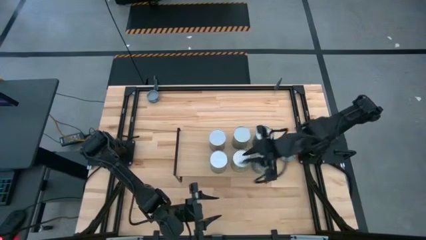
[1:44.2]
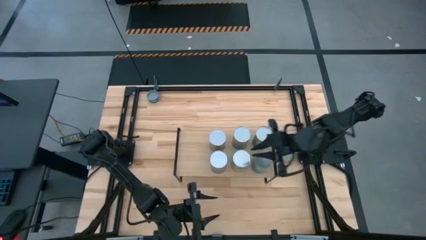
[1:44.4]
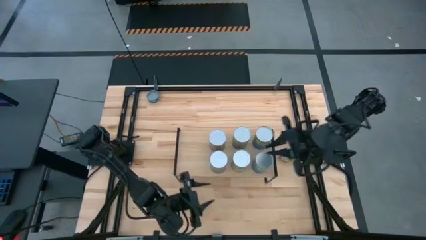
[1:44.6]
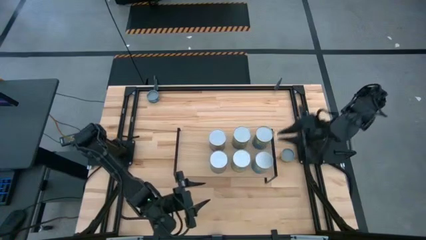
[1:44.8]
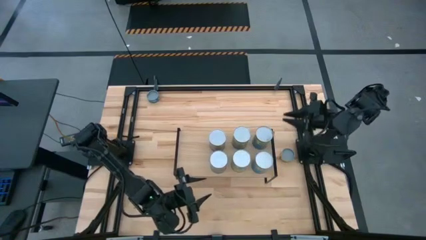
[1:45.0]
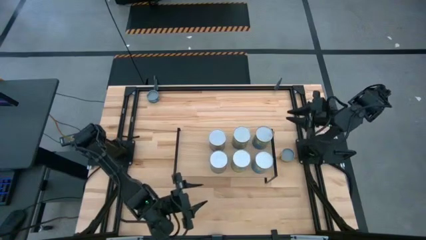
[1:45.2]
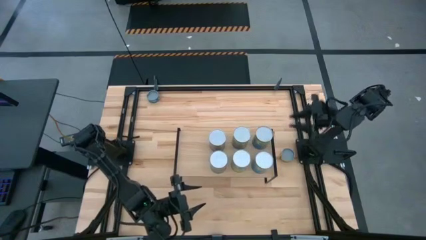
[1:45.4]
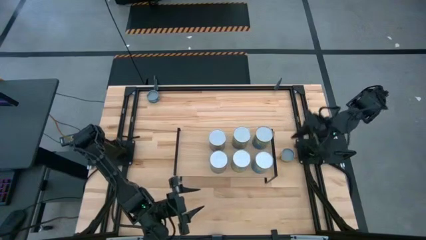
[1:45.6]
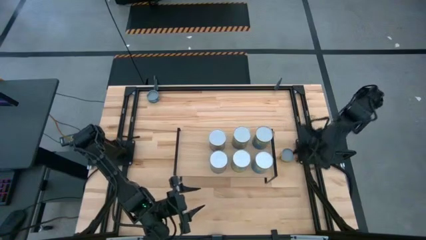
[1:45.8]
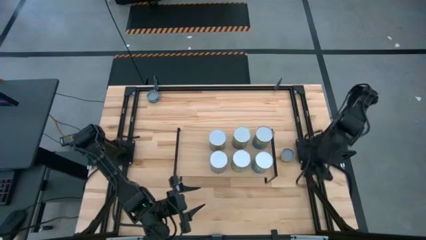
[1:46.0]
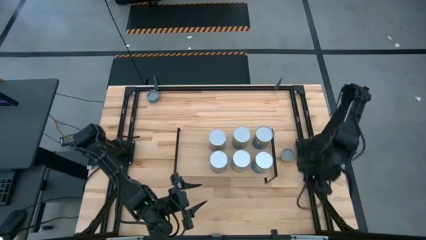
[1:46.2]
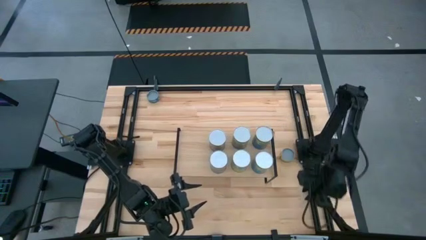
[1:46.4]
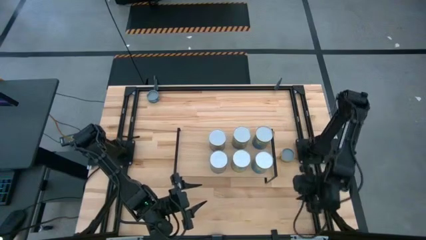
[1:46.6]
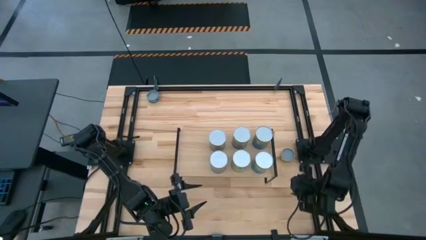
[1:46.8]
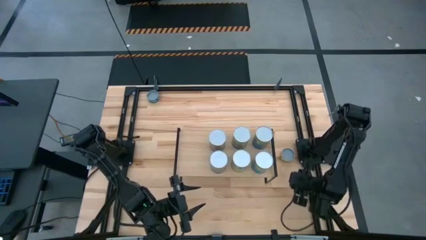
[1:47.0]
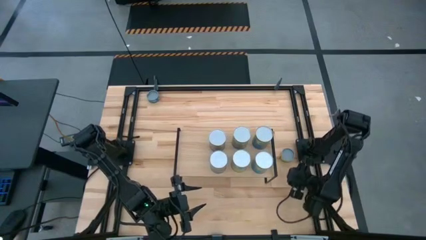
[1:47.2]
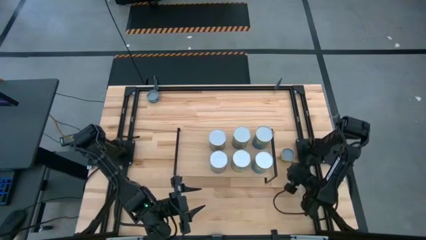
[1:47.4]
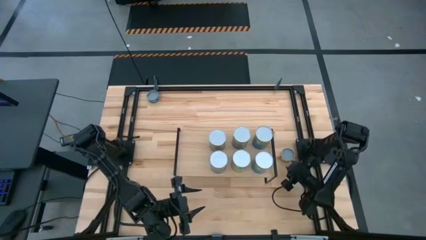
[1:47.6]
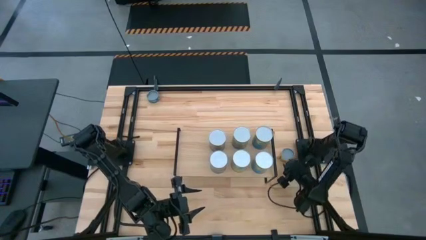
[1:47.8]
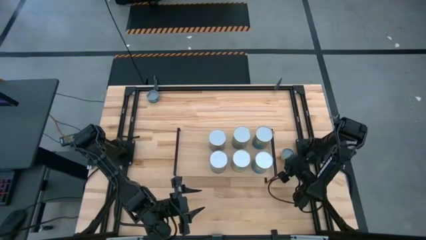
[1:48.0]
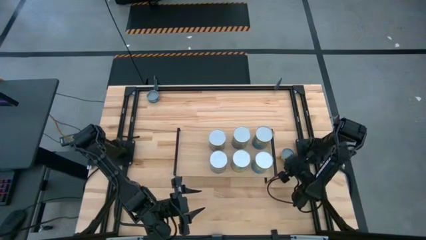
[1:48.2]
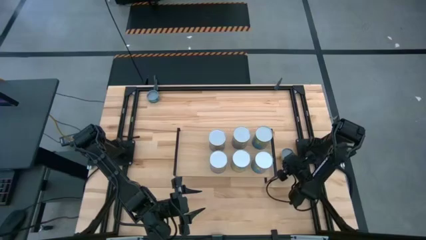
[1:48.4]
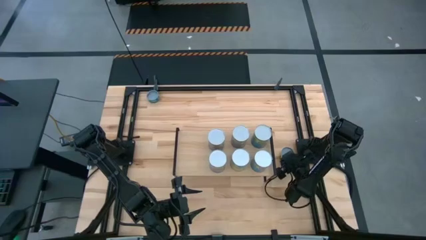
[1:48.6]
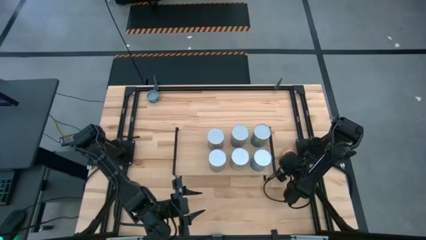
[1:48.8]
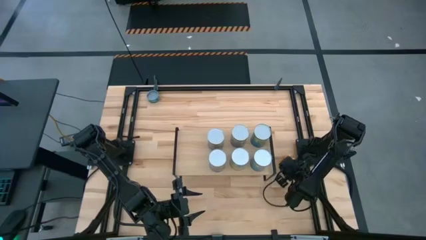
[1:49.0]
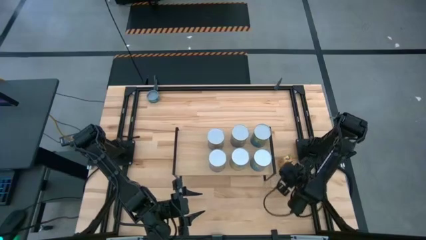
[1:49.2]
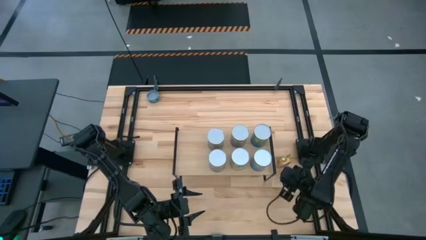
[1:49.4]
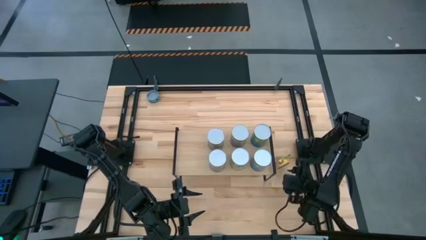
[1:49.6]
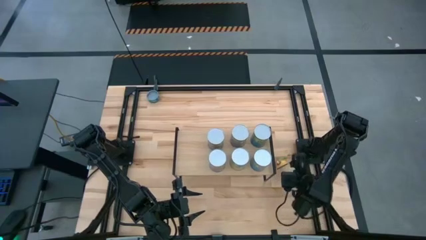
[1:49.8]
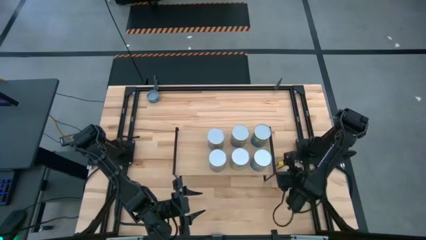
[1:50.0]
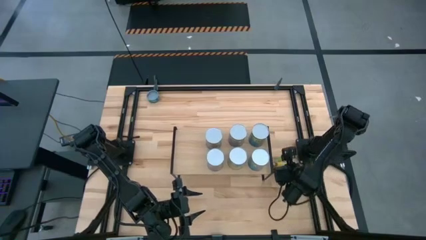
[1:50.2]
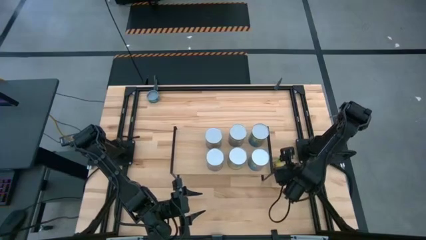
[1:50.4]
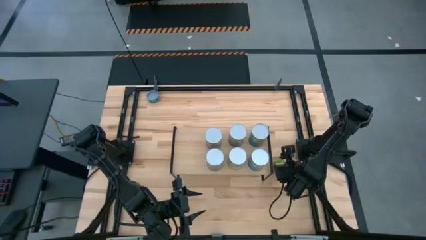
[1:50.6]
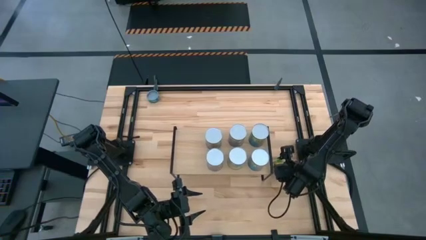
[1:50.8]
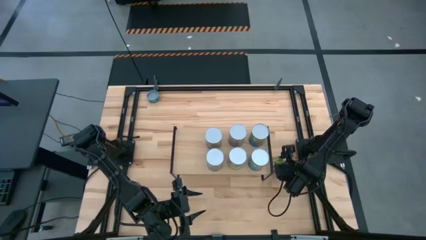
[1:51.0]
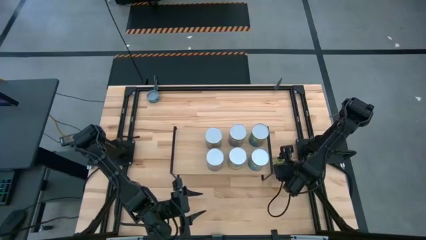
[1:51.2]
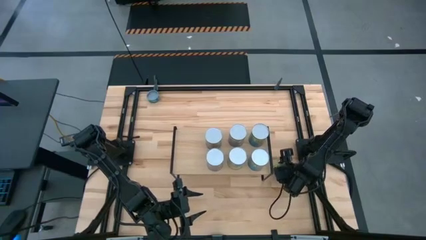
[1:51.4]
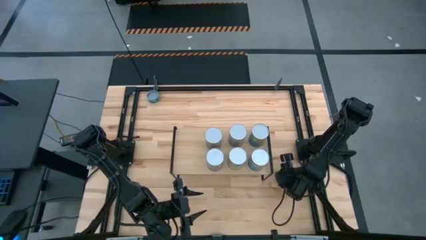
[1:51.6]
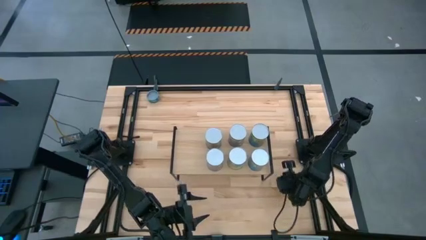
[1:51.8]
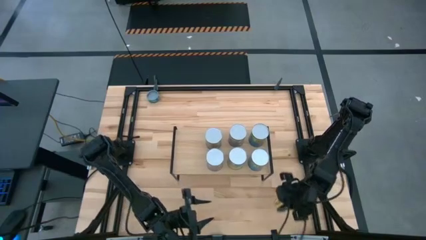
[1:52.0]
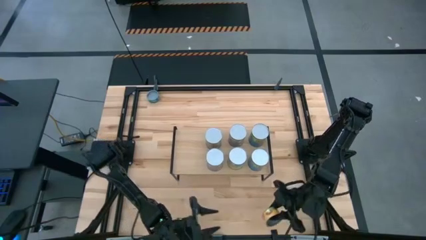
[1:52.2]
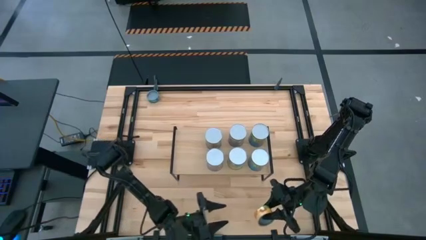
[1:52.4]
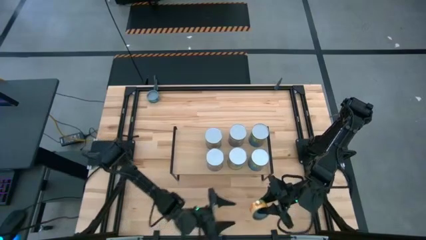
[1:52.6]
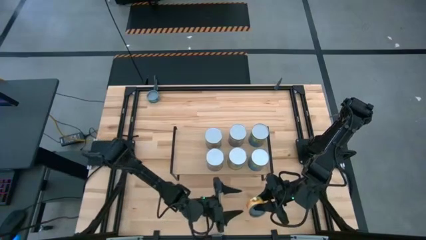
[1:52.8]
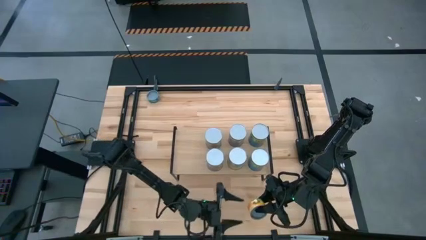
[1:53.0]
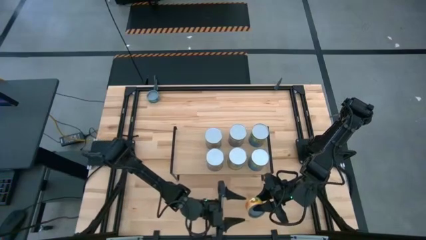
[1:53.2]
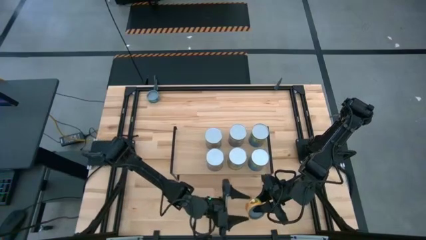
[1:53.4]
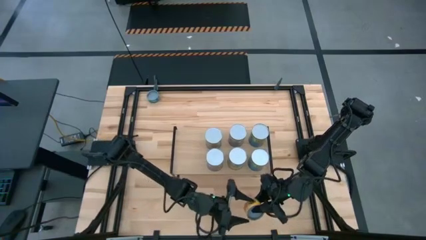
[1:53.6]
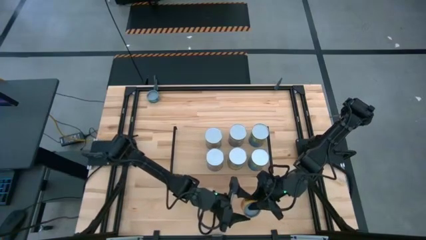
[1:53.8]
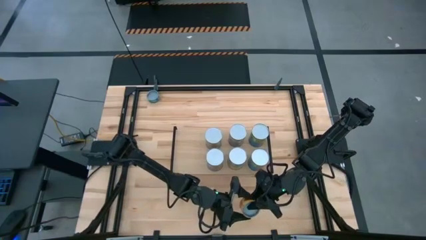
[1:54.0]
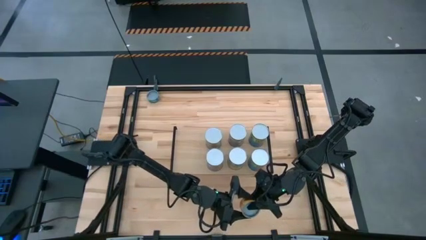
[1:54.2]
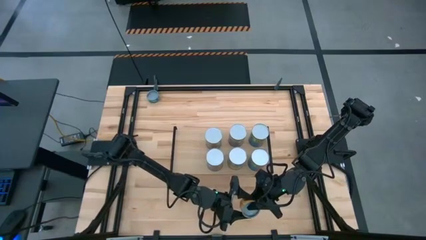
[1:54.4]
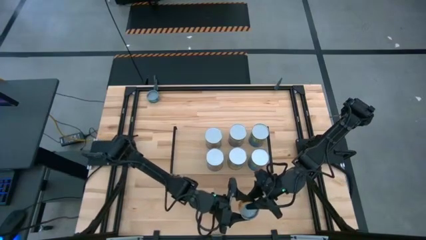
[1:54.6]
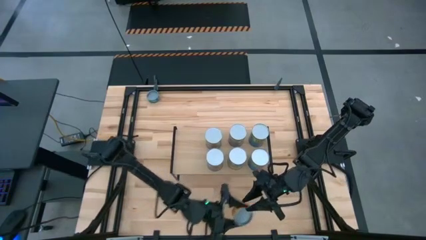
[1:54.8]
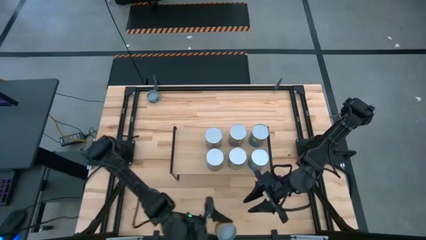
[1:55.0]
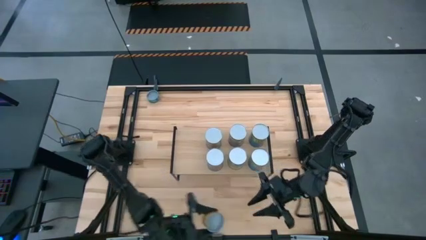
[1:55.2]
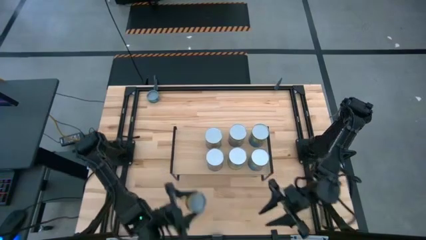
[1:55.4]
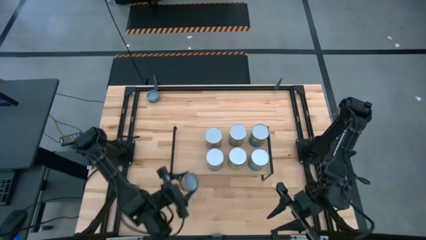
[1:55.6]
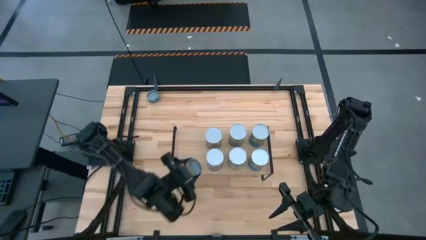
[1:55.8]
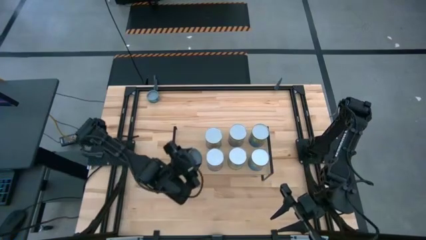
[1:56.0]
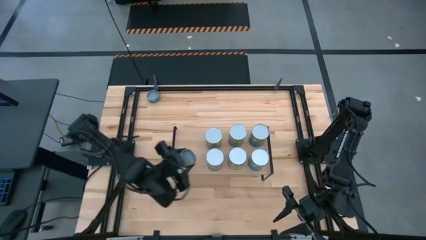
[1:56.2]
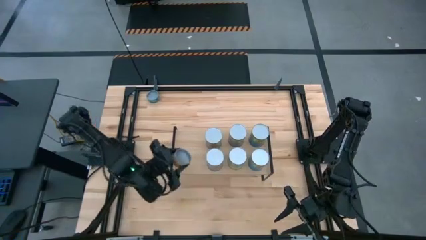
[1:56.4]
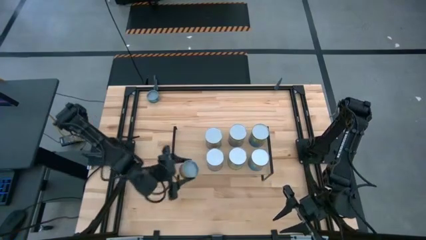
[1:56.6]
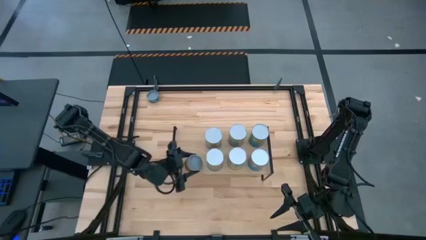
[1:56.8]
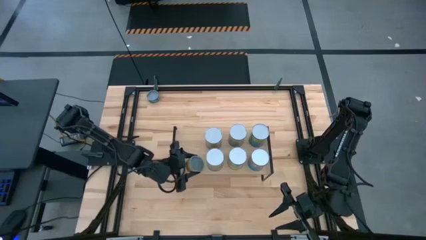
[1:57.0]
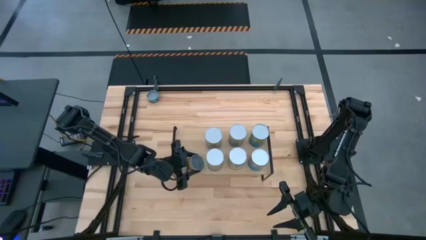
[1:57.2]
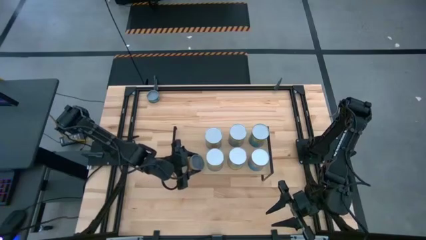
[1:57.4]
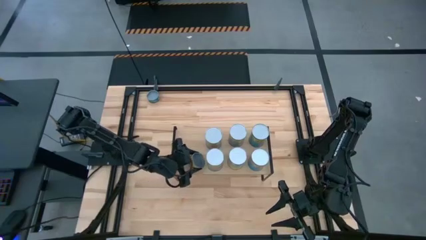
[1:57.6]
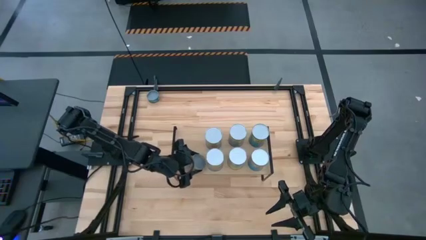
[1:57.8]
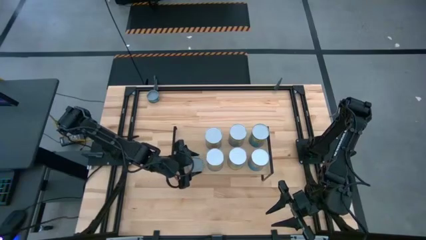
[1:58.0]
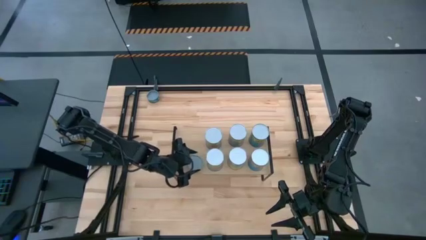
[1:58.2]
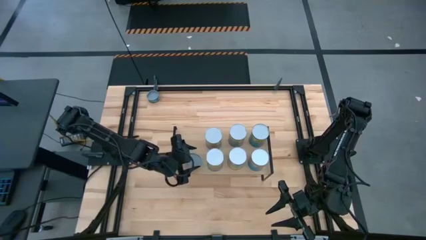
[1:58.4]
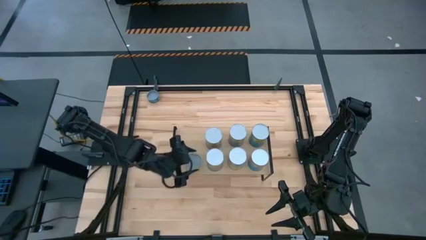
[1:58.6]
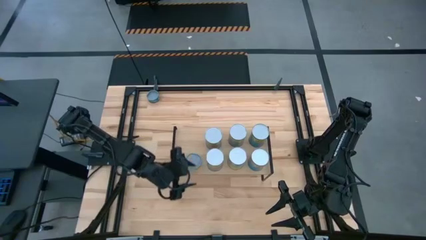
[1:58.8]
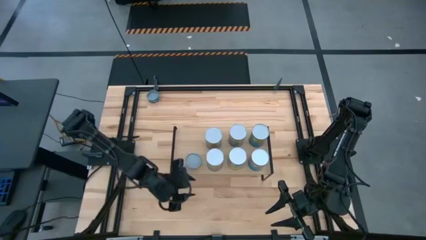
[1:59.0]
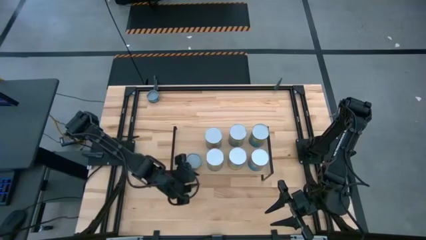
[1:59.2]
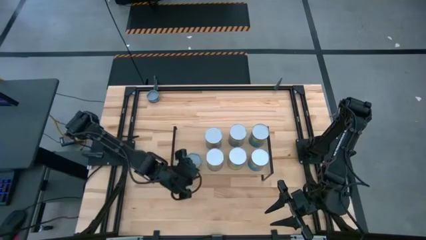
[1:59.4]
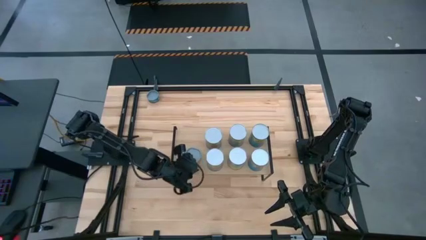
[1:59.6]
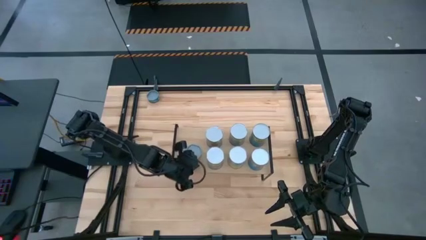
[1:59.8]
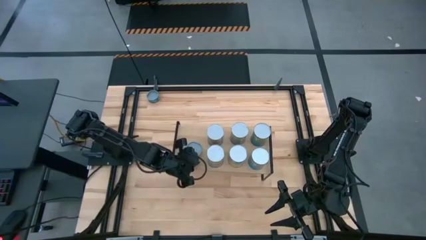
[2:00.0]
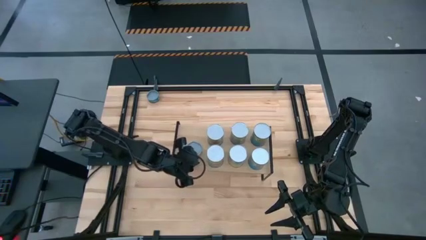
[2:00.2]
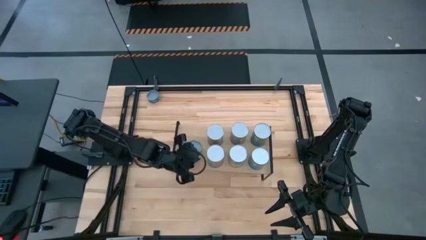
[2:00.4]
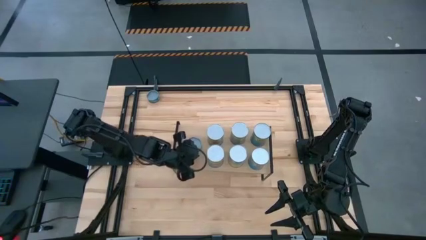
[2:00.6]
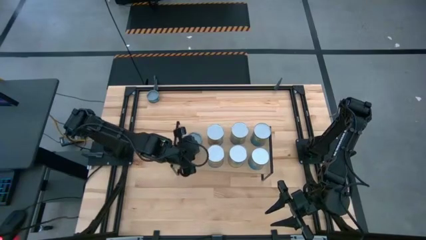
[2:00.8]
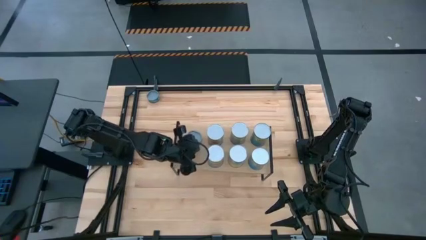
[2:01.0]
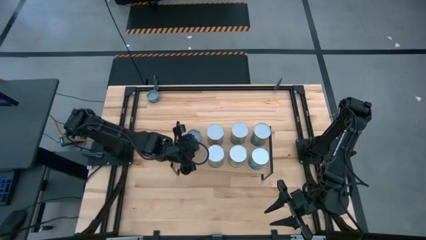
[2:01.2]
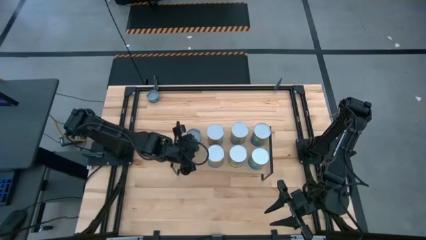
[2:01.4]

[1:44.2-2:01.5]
Task: Pick and place cans onto a shelf
Put the canned mushrooms on the shelf
